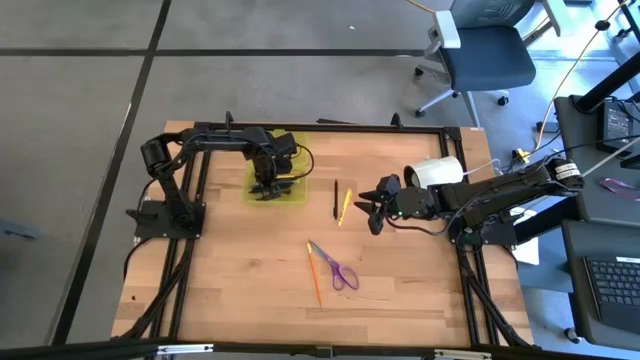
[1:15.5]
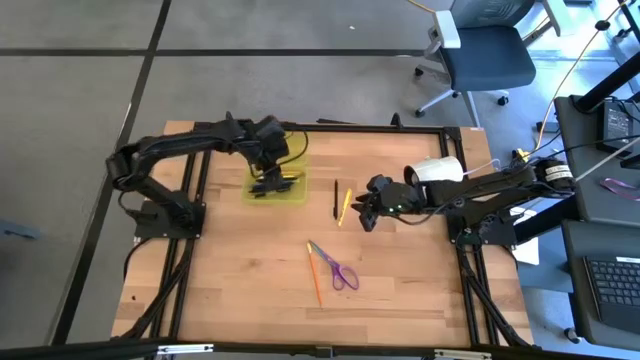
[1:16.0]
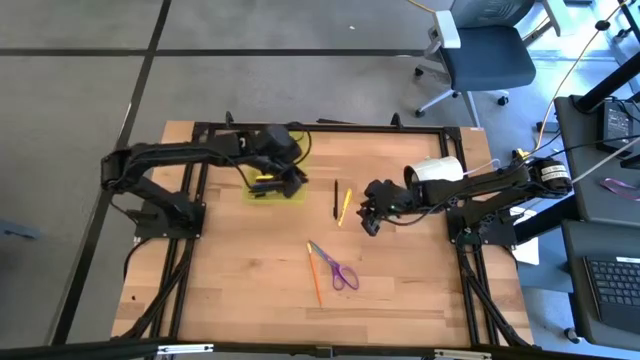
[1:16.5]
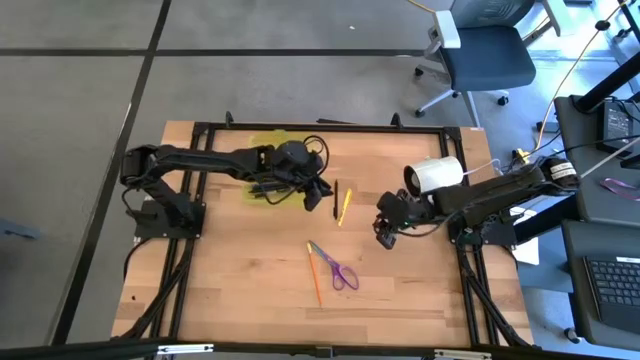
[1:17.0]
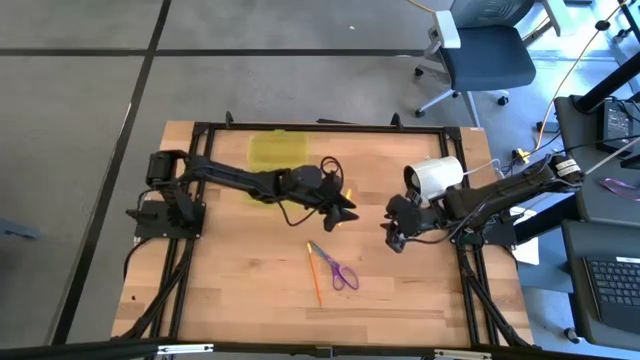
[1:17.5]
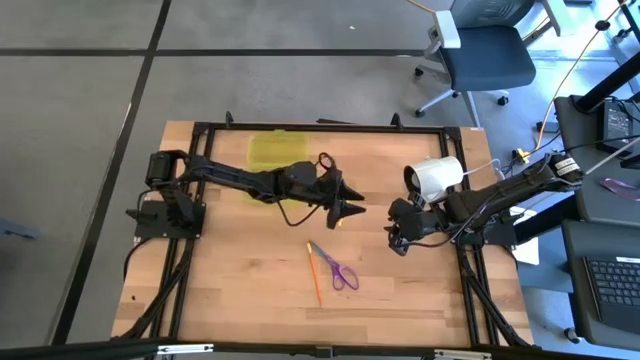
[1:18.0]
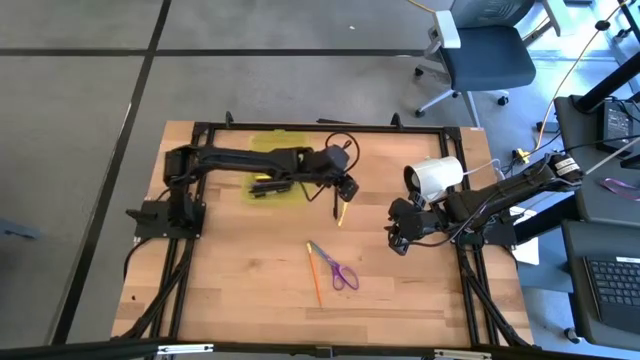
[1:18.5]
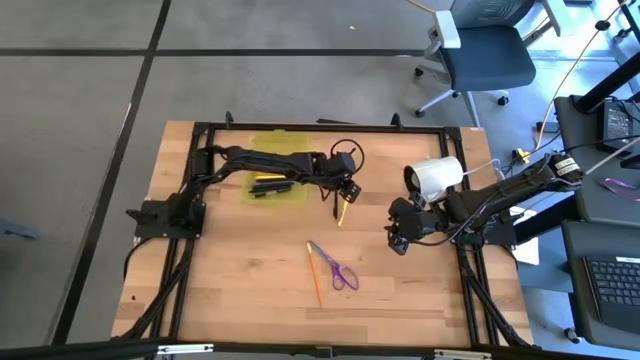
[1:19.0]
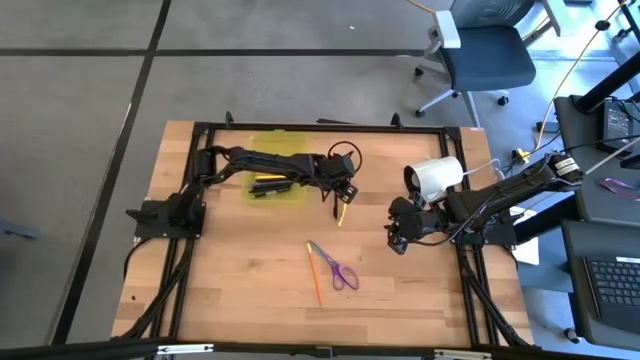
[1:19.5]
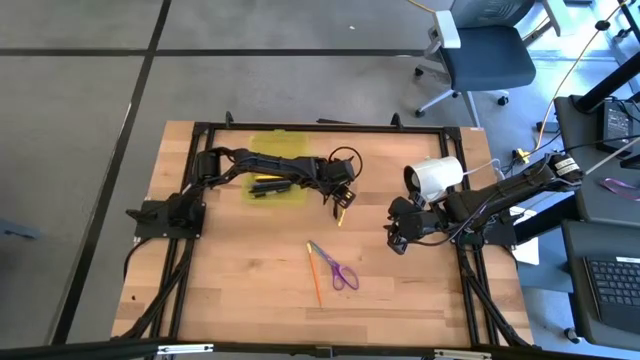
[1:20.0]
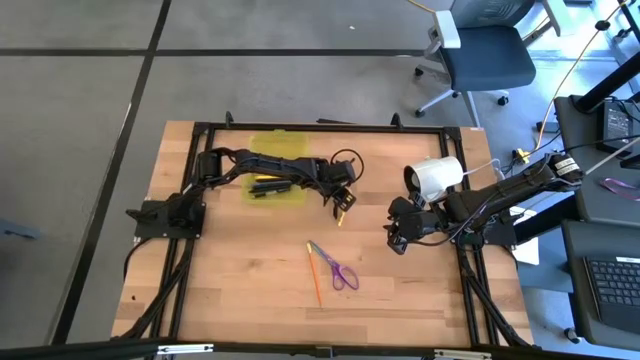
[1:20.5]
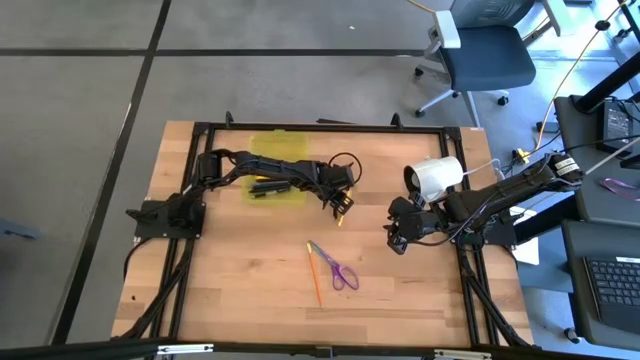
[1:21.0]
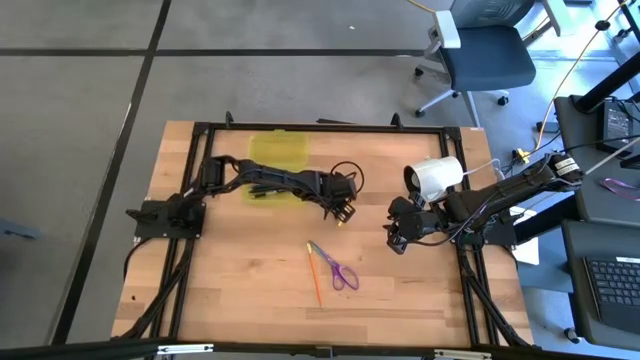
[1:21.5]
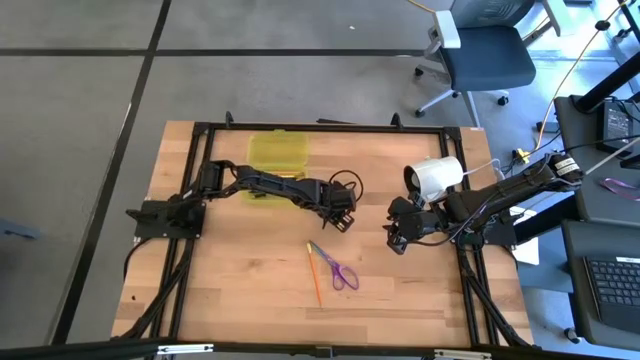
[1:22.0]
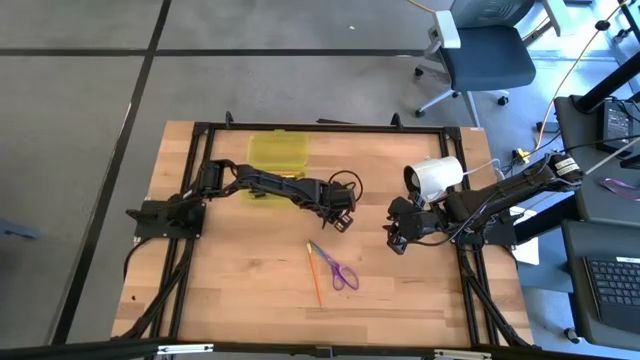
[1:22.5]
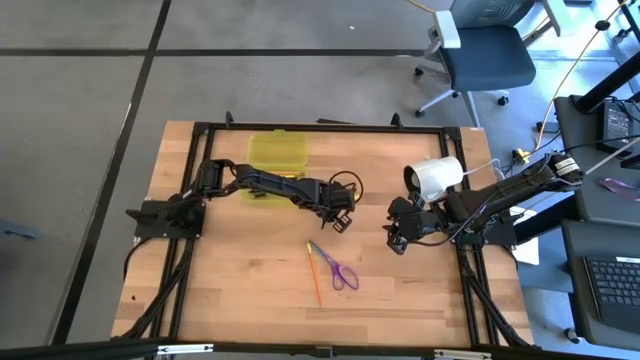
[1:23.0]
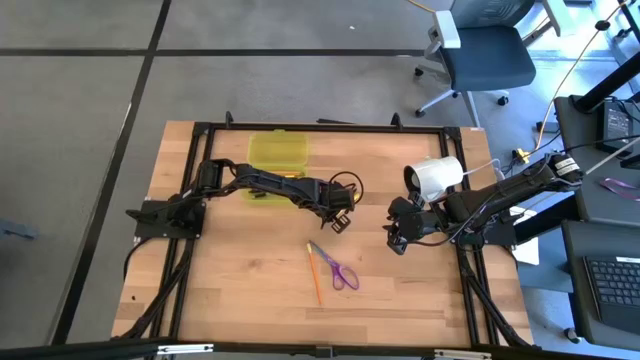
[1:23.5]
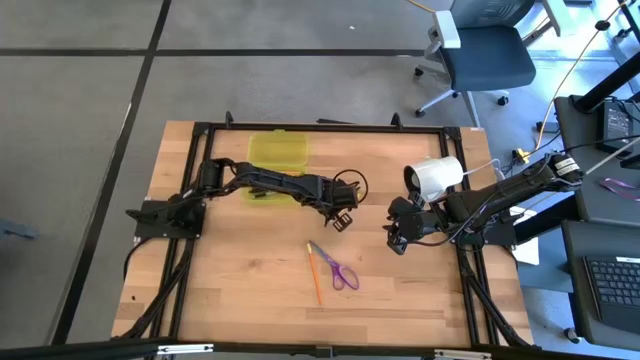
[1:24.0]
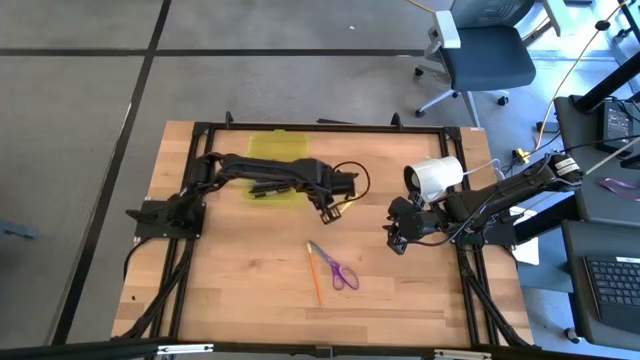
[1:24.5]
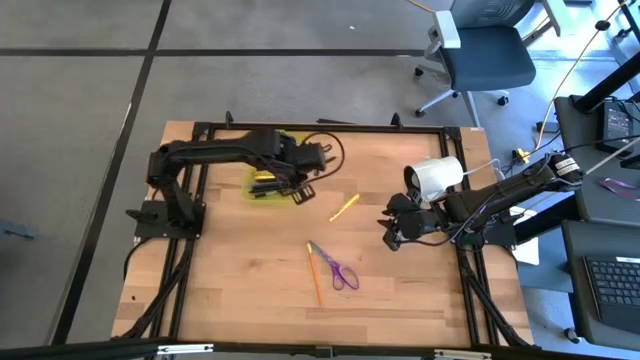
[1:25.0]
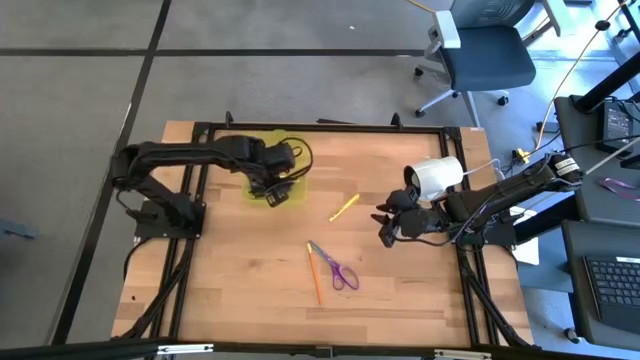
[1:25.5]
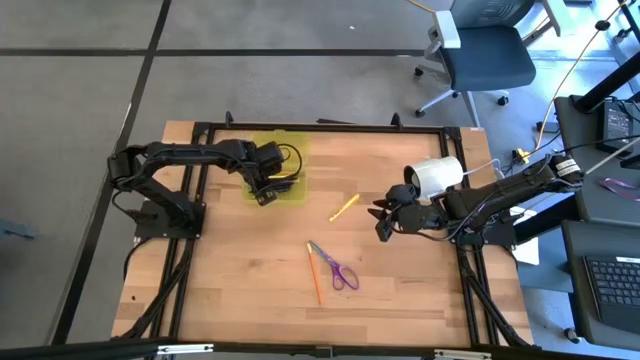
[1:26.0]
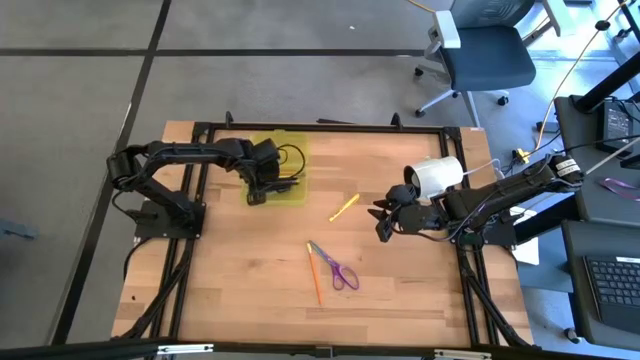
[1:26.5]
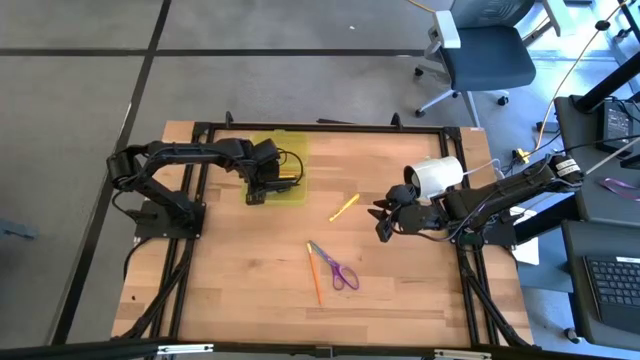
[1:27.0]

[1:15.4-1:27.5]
Task: Pick & place school supplies into a supply box
Put the black pen into the yellow supply box

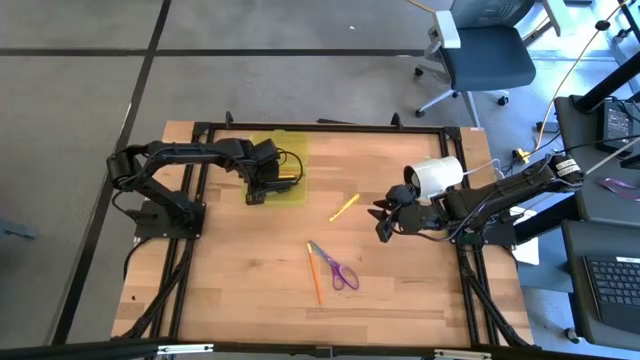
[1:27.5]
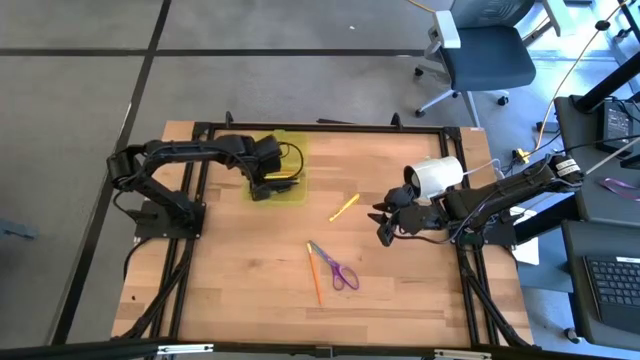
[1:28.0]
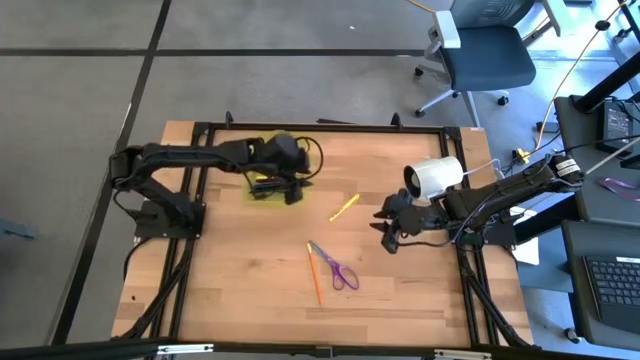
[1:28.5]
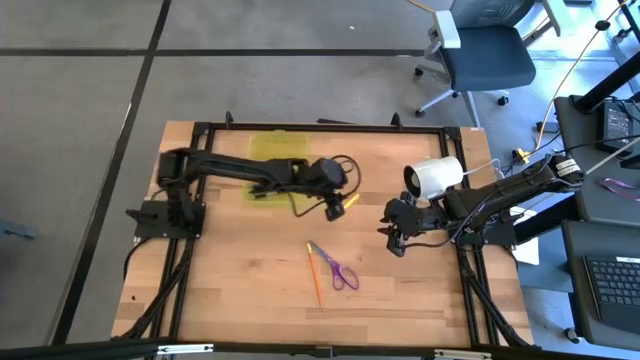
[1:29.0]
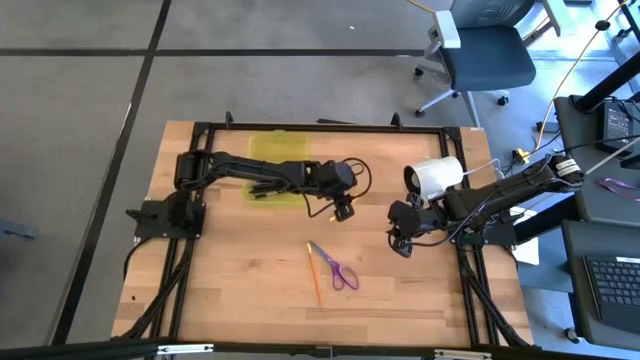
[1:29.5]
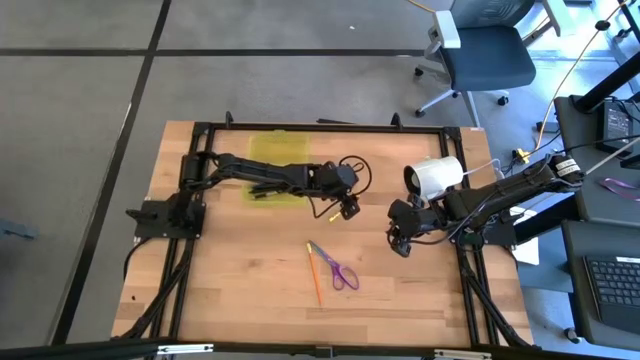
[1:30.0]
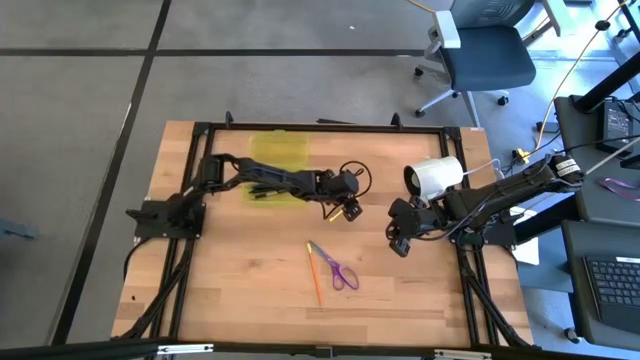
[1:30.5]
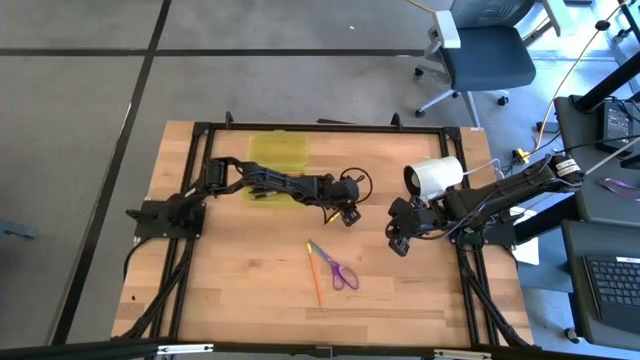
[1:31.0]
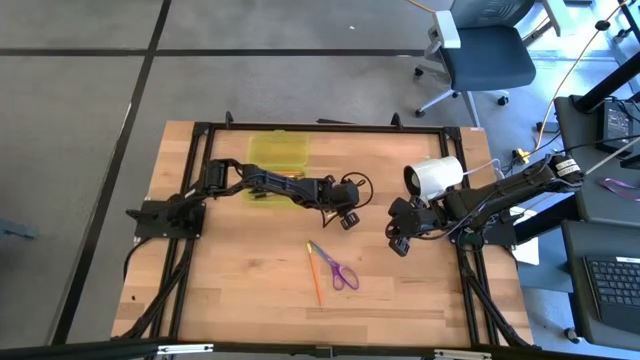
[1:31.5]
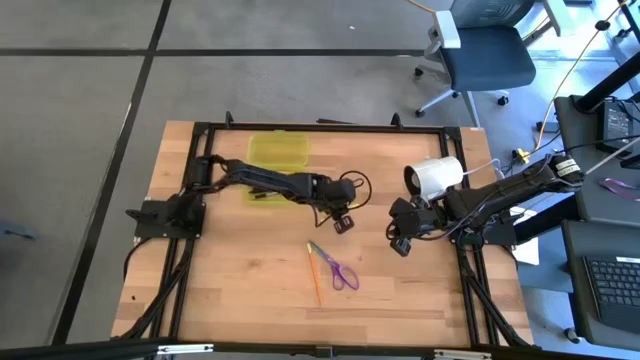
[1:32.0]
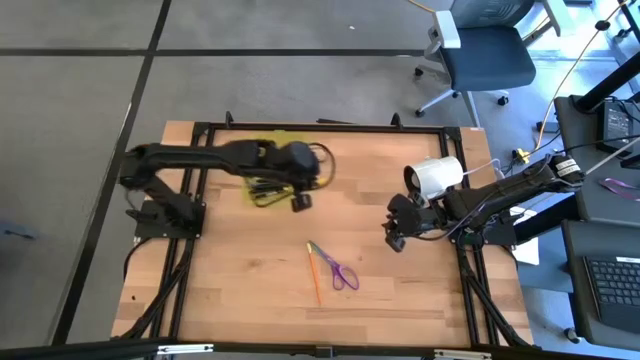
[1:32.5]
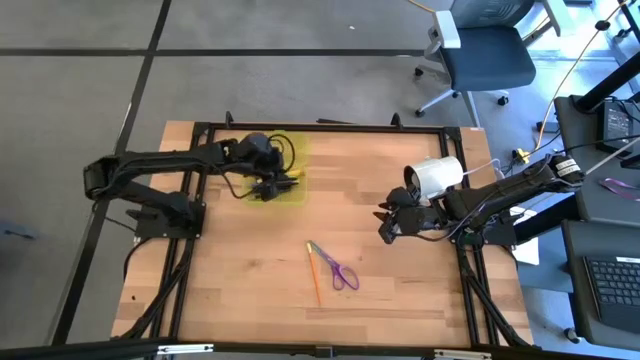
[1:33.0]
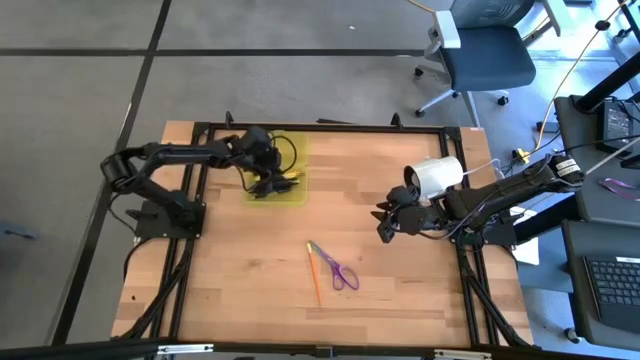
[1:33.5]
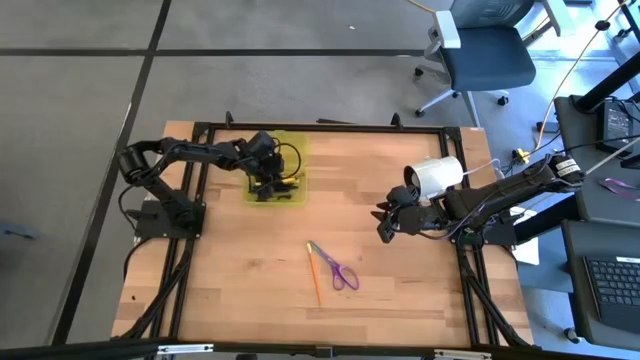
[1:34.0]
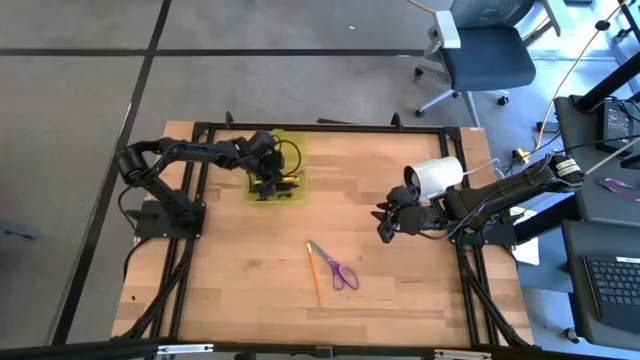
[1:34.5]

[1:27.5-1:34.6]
Put the yellow pen into the yellow supply box

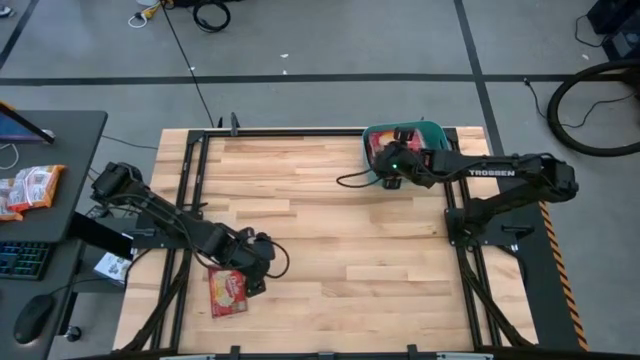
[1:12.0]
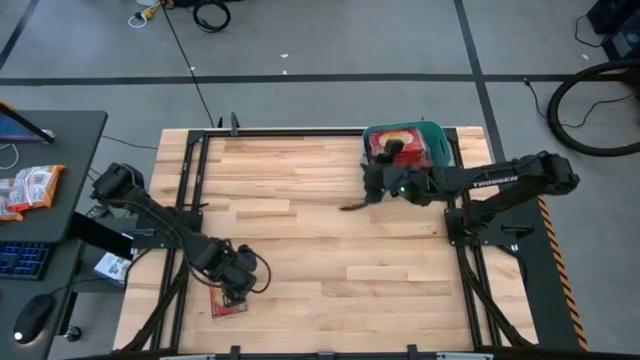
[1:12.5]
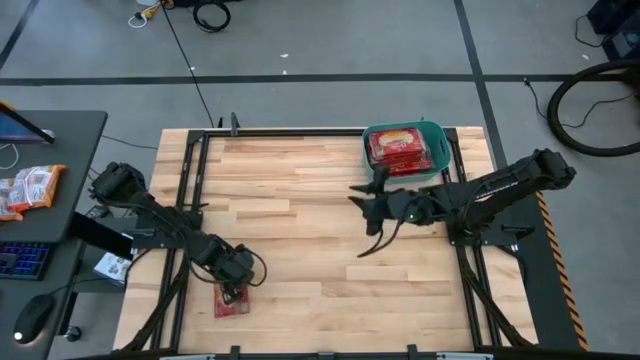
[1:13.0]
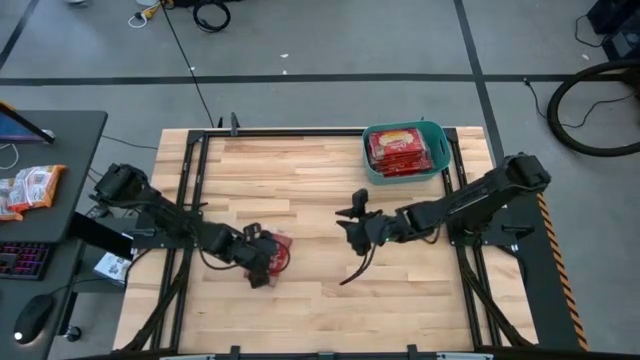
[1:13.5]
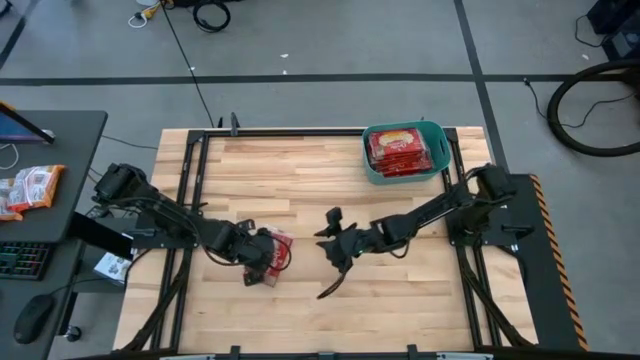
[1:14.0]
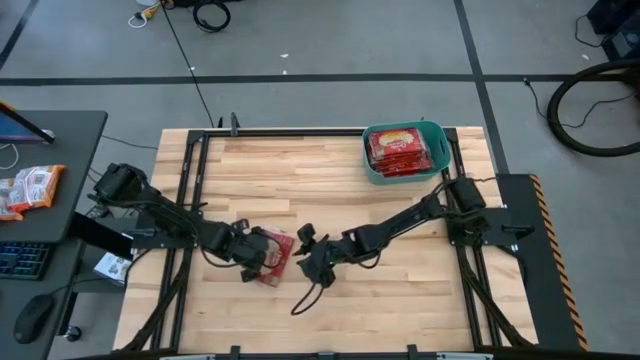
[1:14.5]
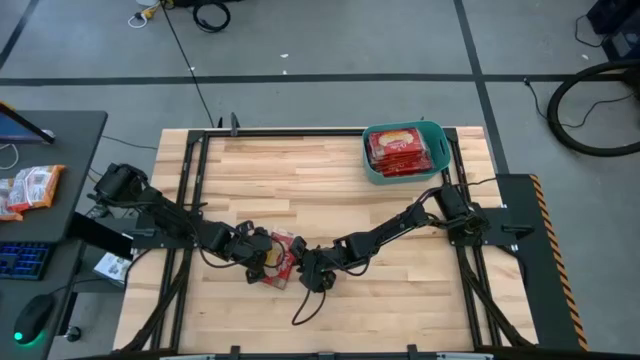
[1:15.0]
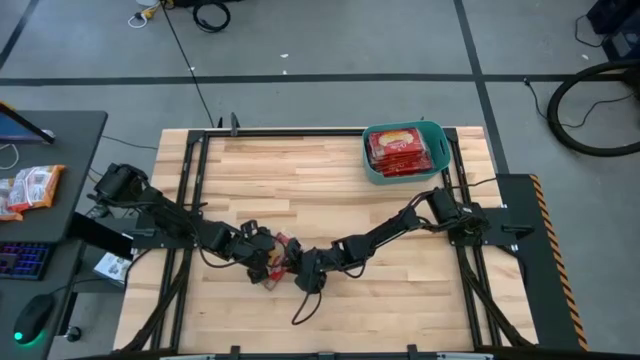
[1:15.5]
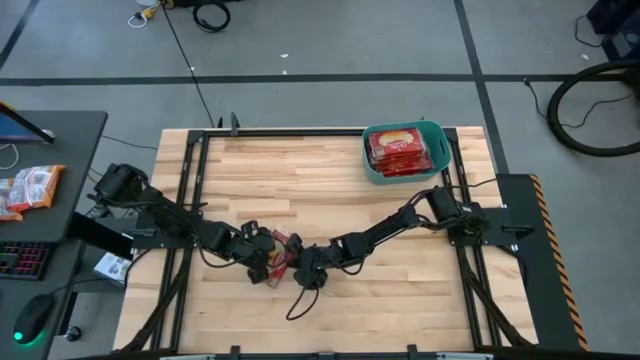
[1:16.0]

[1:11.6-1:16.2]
Task: Sort popcorn bags into baskets
Put the red popcorn bag into the green bin
